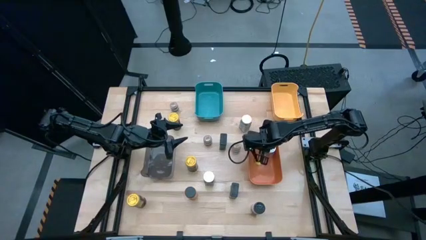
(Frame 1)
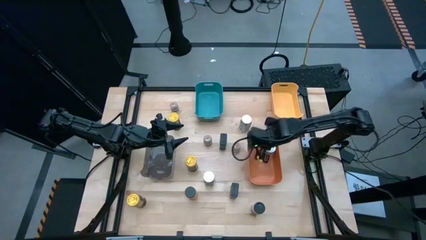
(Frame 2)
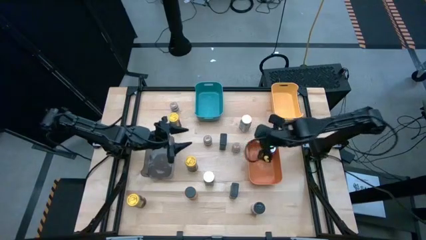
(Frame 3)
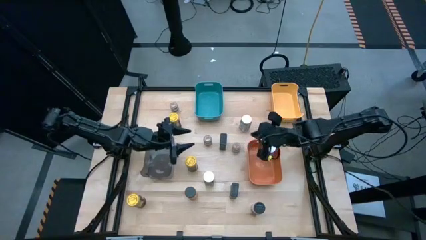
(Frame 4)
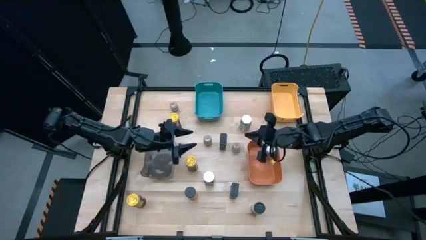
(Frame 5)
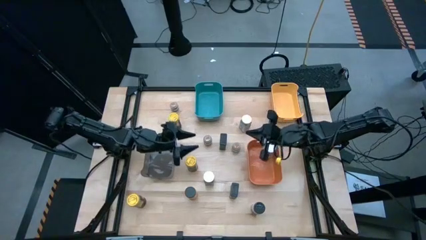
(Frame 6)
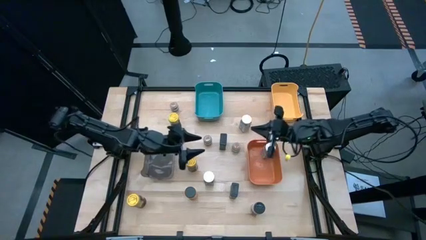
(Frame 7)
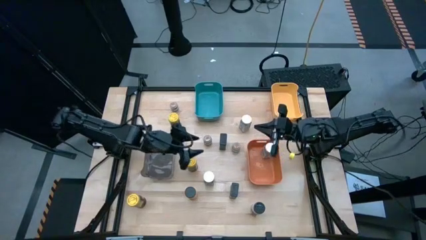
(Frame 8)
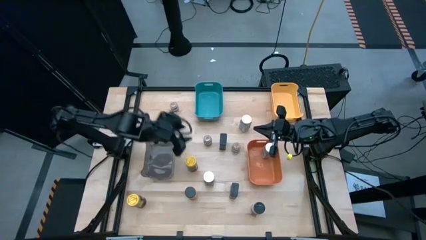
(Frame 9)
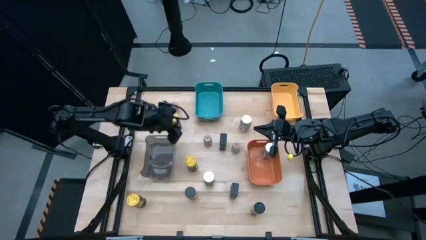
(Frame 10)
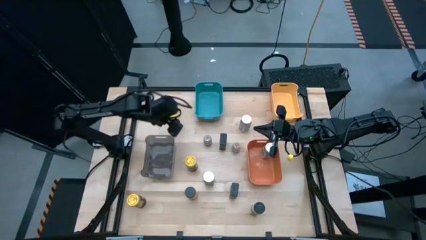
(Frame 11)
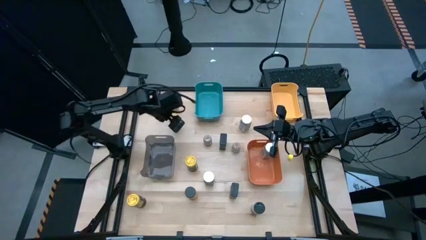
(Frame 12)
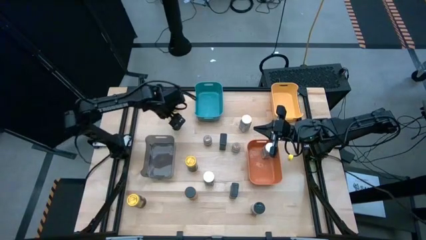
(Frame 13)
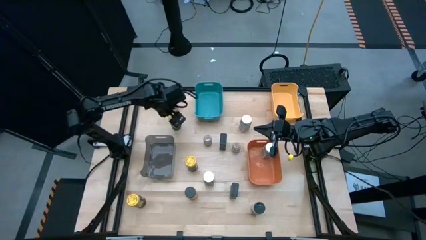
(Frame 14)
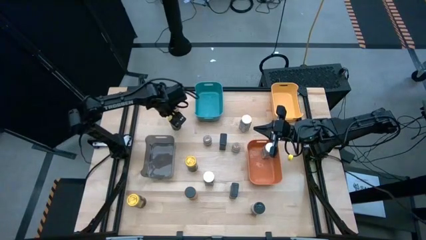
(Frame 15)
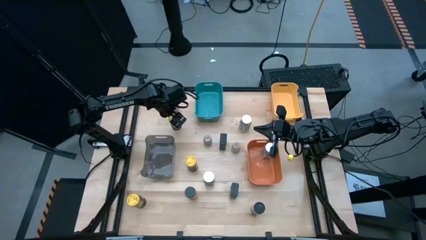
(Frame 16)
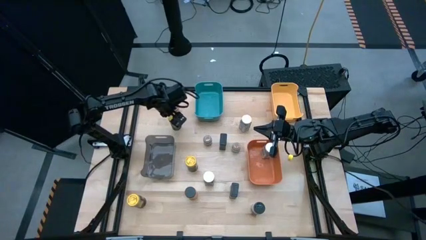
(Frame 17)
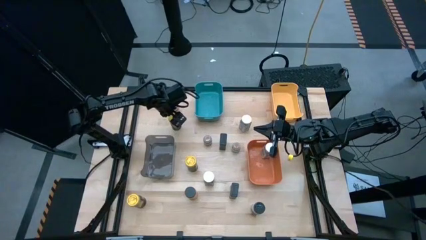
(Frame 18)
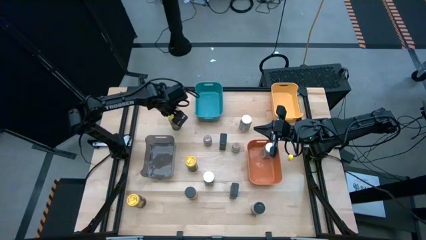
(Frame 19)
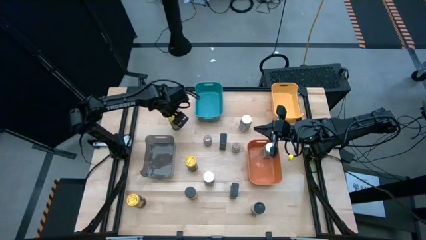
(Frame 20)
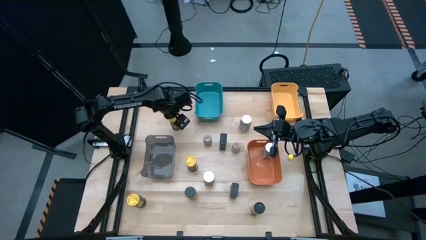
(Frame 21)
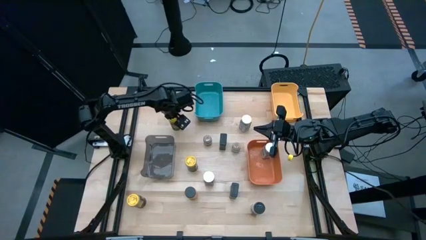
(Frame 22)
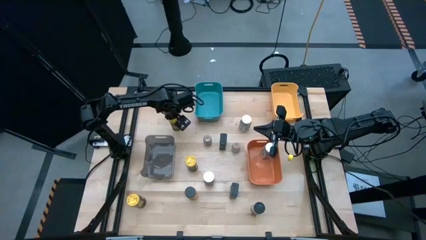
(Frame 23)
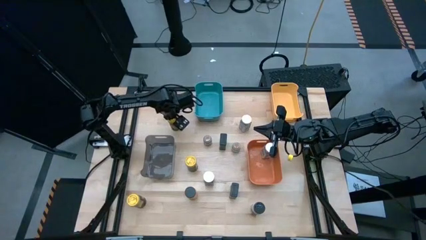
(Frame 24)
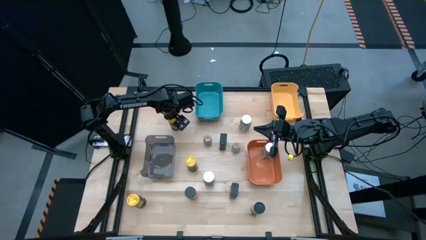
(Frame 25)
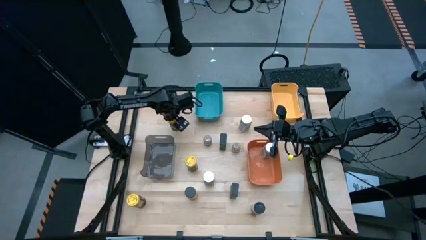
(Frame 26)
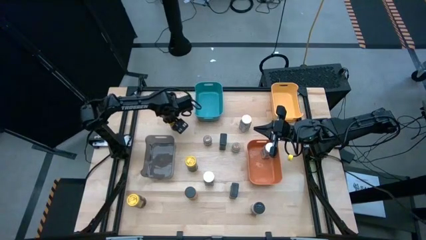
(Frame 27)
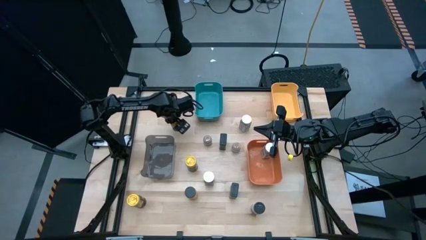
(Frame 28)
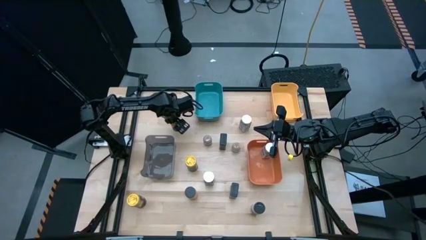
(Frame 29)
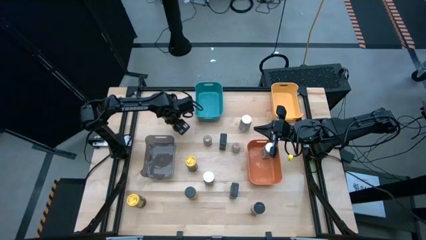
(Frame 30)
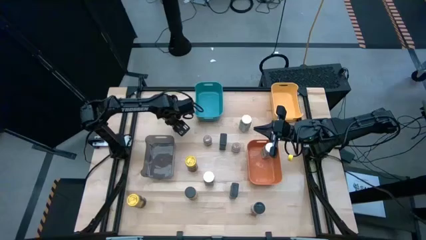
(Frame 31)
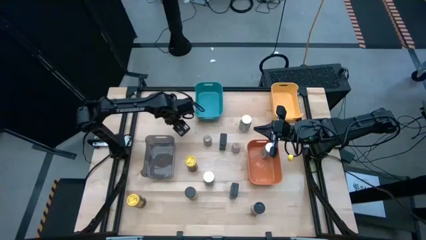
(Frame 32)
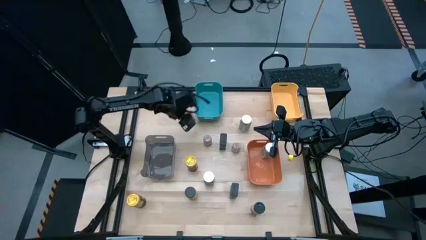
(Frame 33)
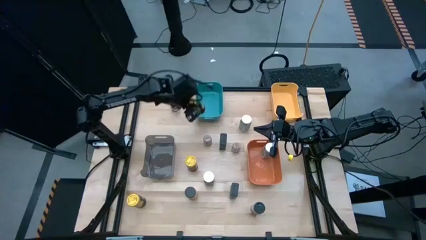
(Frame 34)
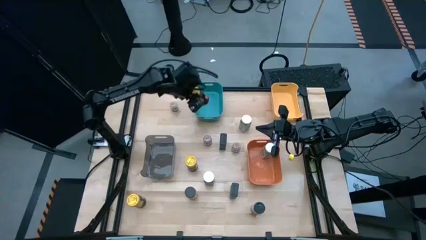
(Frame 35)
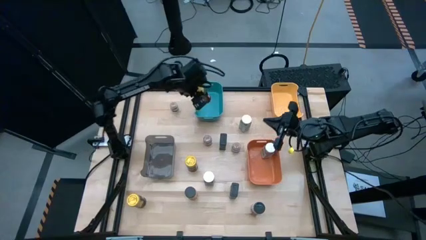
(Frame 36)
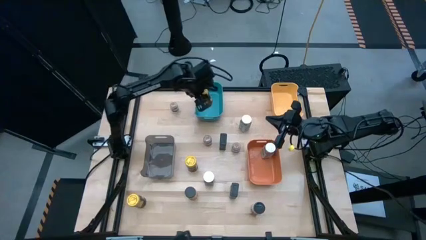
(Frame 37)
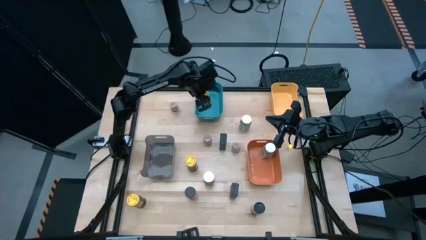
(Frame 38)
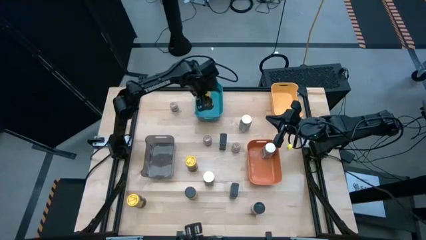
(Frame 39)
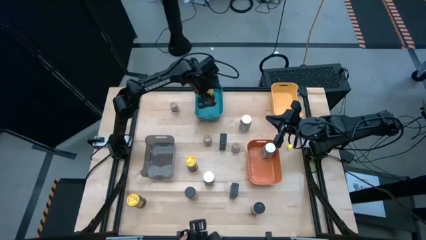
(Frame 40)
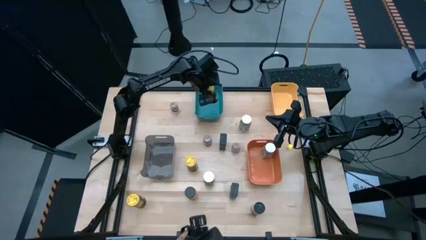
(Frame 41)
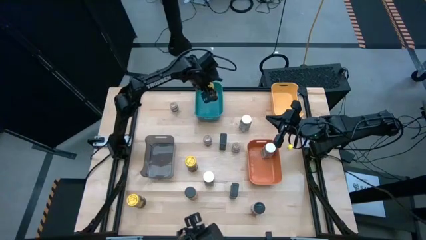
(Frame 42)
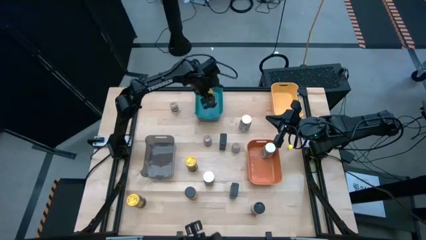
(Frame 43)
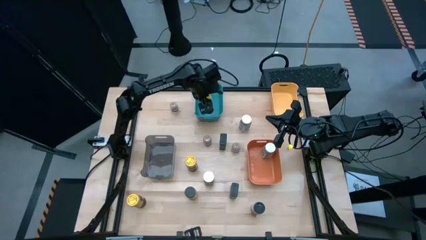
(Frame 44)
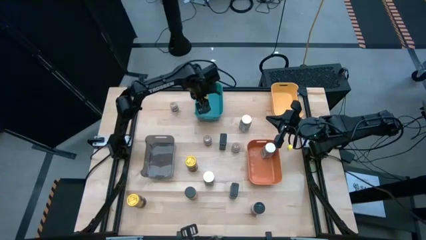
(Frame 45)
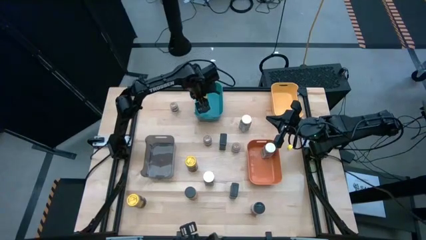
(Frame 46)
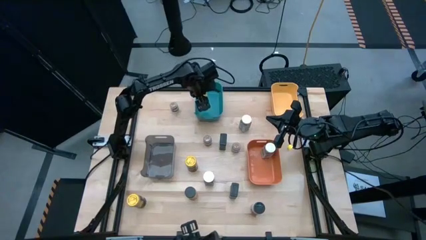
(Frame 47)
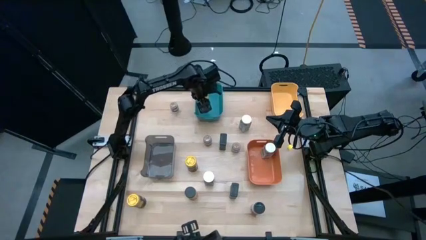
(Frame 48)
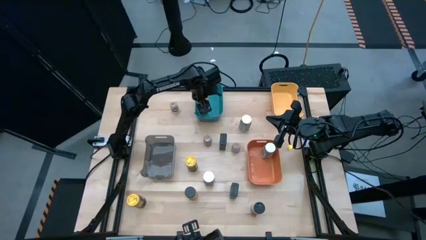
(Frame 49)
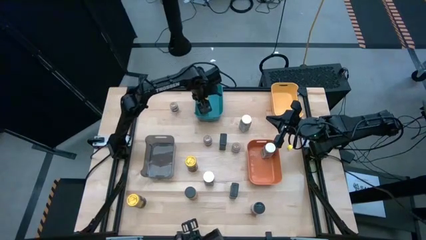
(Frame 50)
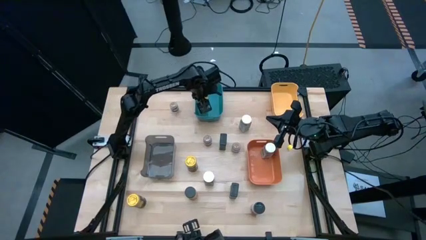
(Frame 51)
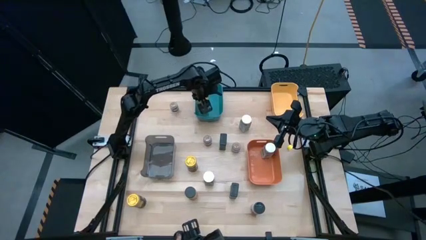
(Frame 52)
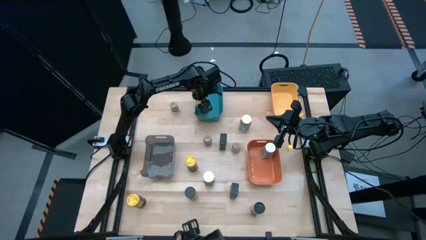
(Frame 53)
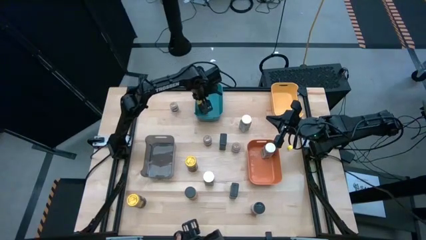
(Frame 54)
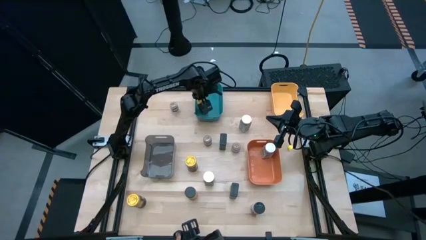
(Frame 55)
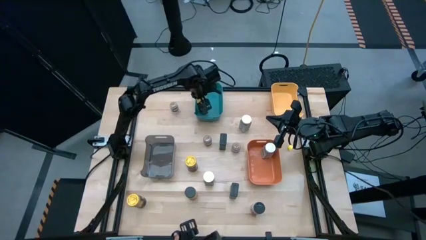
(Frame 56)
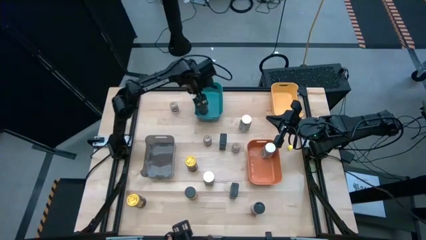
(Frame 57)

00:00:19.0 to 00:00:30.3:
Task: Sort spices by type
Put the top yellow seasoning bottle into the blue bin

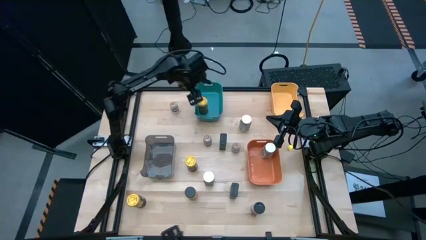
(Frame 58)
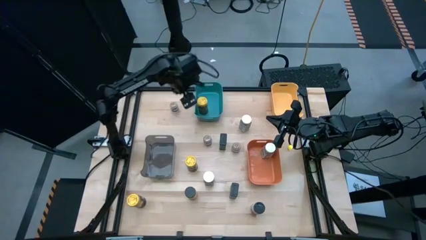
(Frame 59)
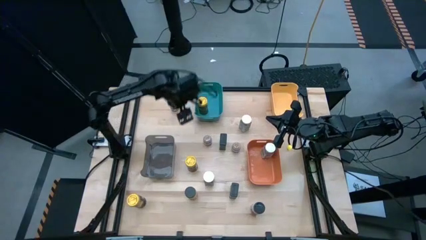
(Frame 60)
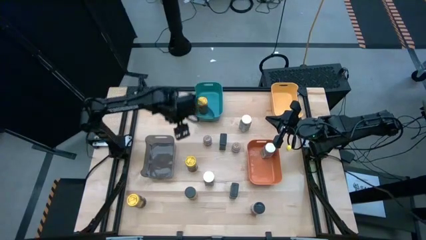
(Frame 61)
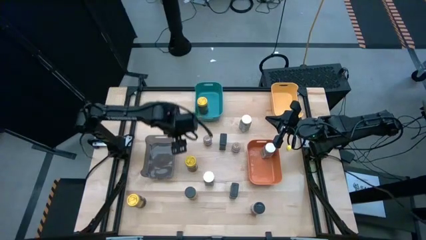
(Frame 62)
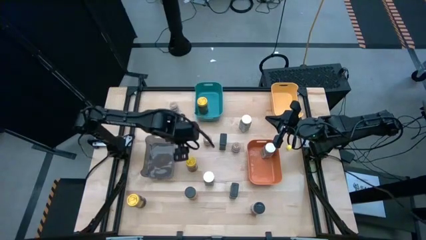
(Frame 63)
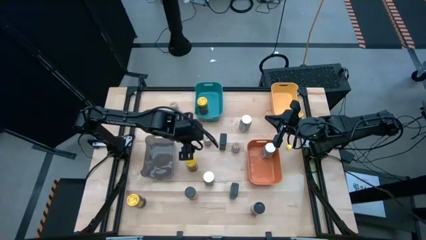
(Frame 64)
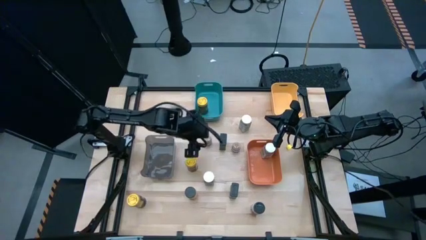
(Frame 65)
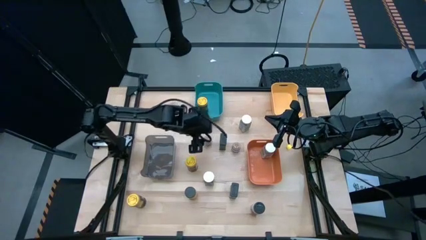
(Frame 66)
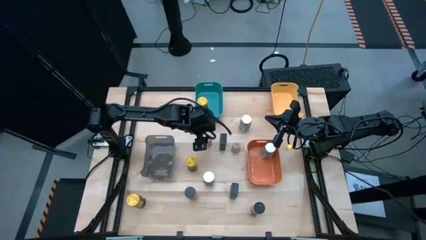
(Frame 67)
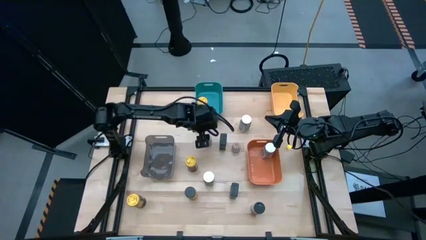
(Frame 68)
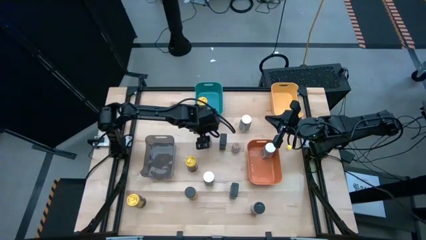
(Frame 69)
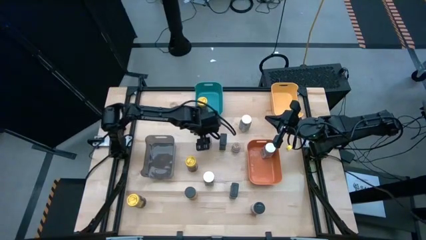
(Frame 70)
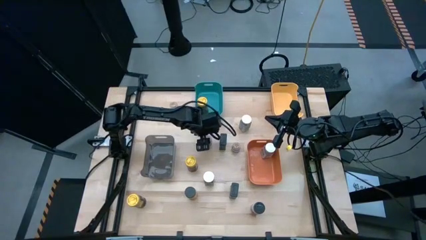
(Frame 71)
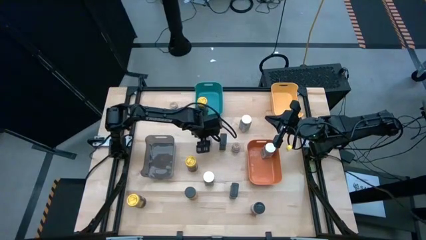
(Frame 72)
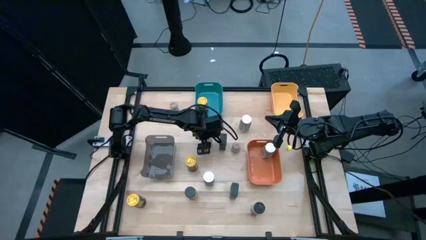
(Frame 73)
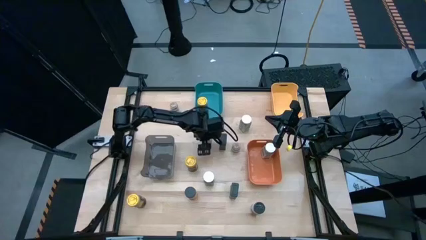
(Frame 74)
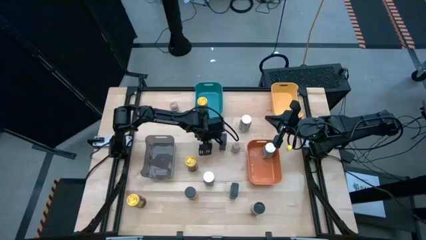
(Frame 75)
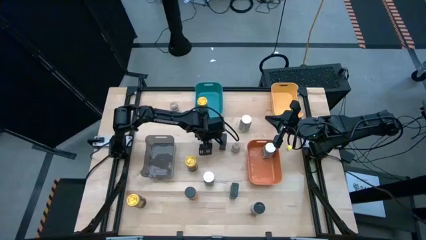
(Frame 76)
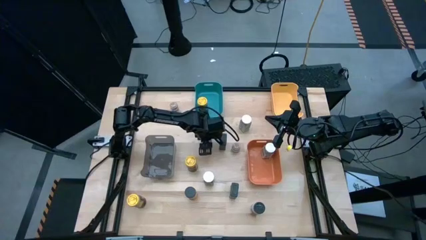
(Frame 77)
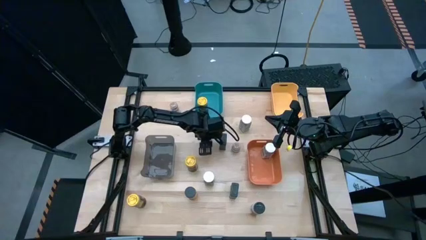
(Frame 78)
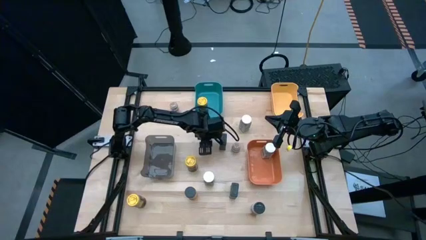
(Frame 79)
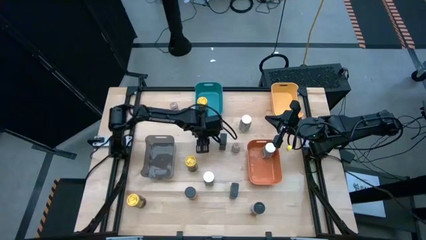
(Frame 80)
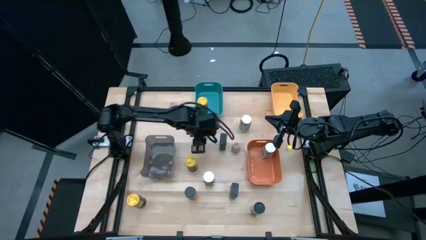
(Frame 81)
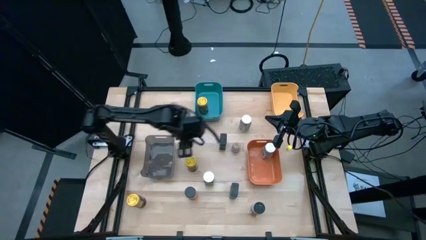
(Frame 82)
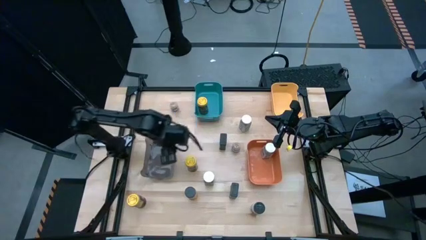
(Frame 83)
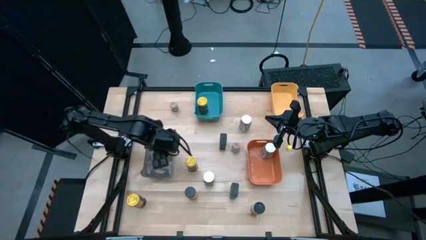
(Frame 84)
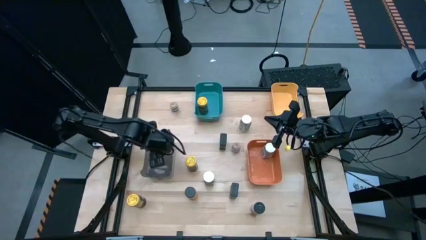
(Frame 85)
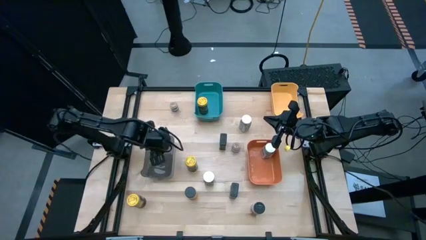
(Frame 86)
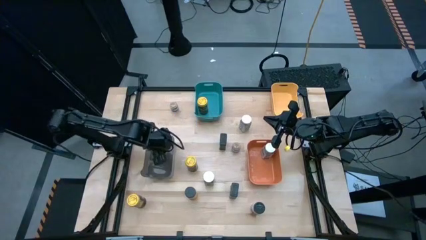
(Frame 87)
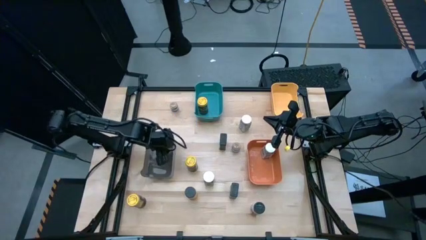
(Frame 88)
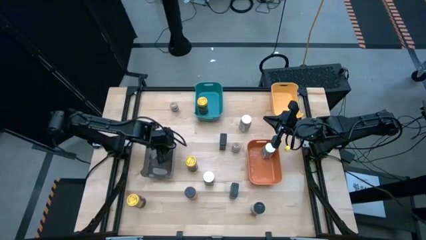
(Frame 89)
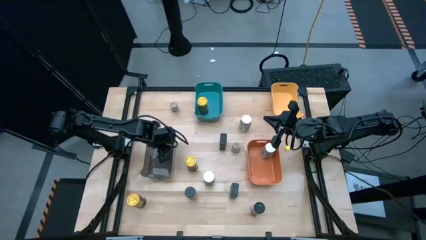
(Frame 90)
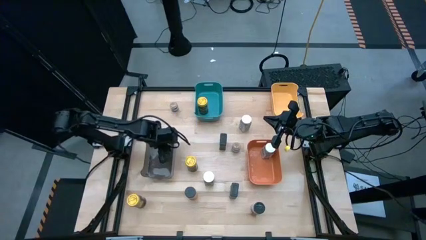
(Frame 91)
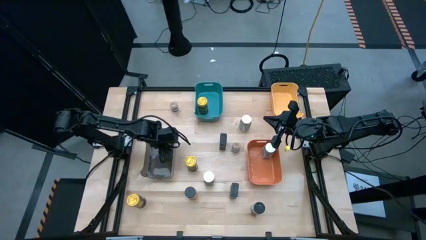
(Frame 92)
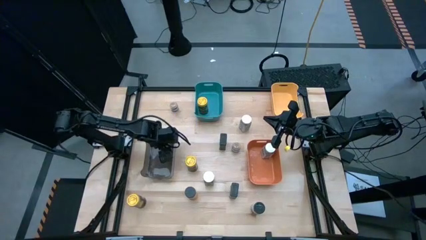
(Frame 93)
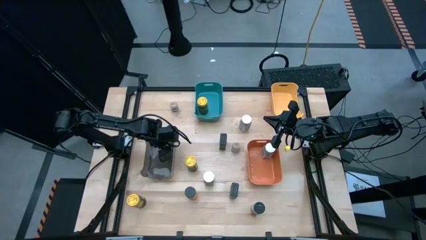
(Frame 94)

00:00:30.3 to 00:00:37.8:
Put the bottom left brown seasoning bottle into the black bin
